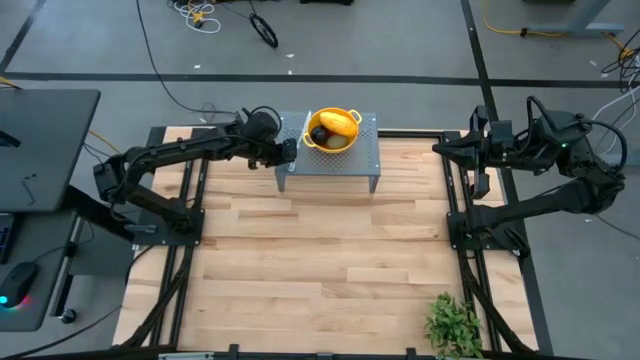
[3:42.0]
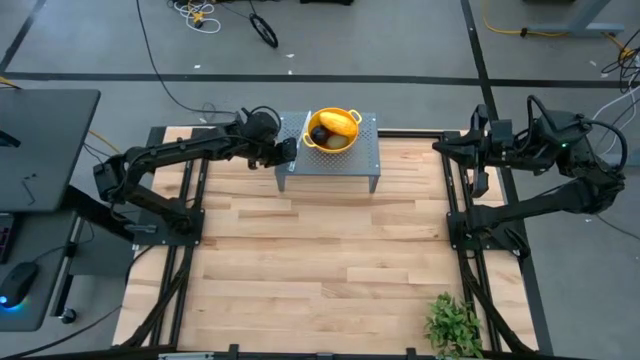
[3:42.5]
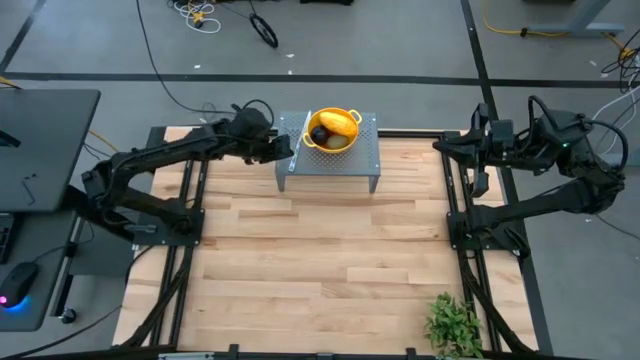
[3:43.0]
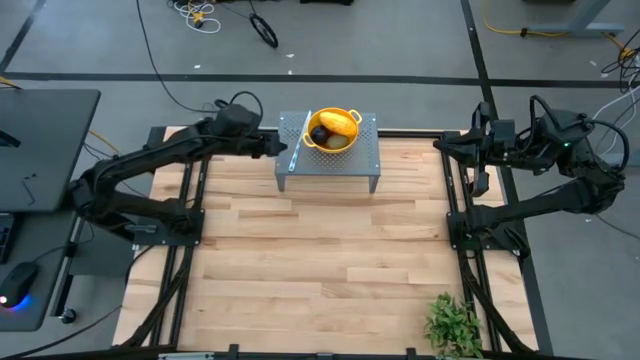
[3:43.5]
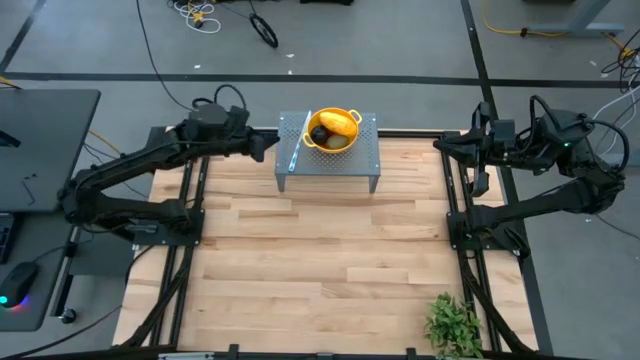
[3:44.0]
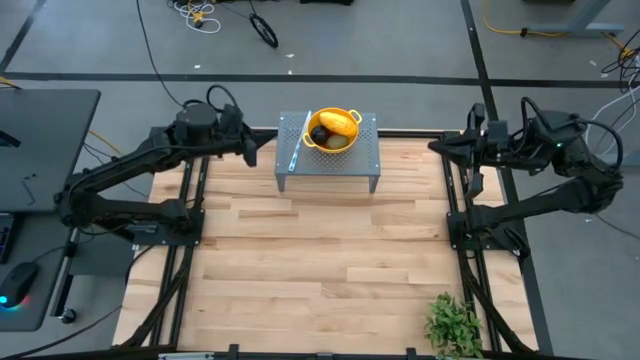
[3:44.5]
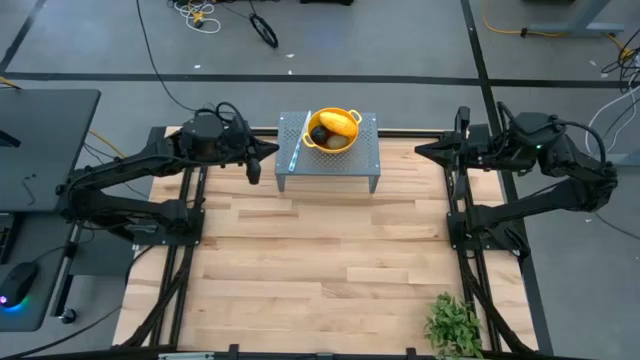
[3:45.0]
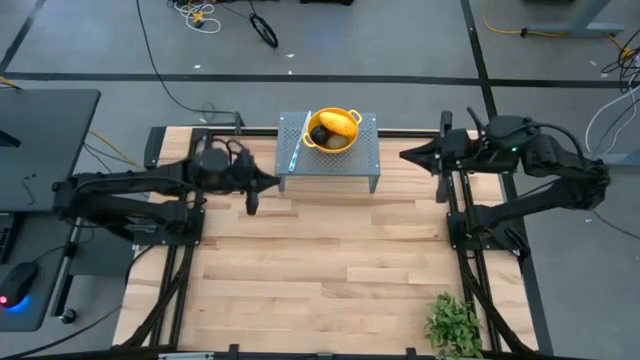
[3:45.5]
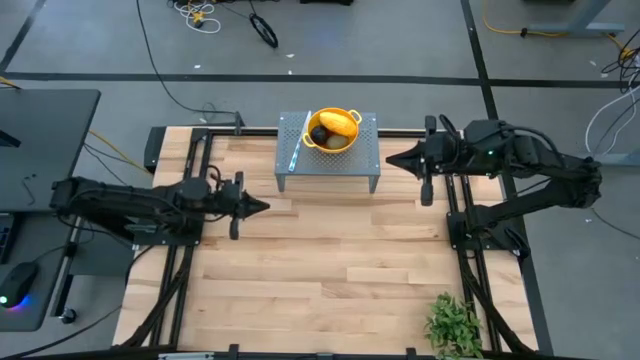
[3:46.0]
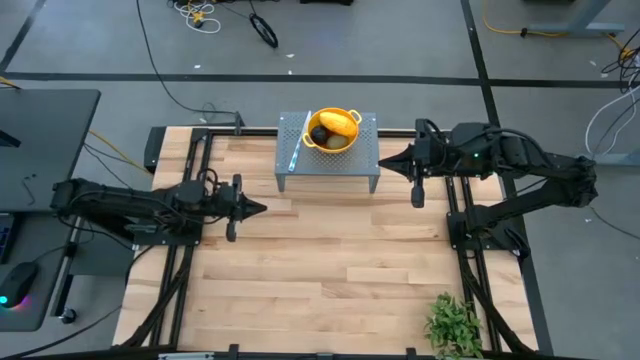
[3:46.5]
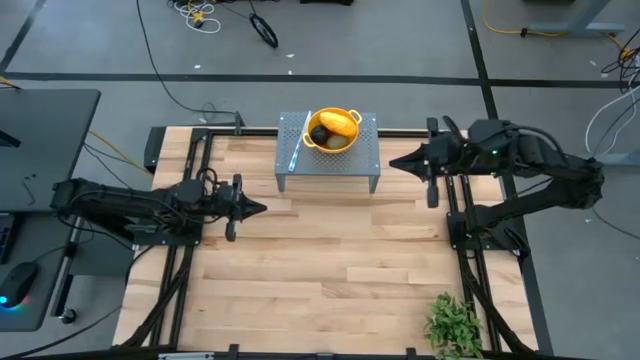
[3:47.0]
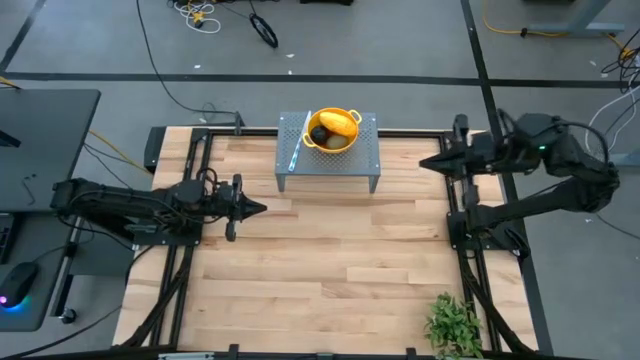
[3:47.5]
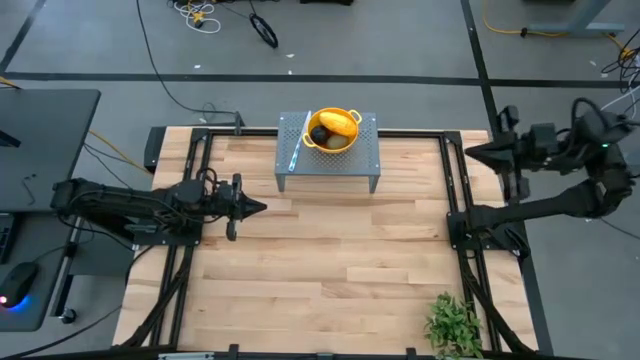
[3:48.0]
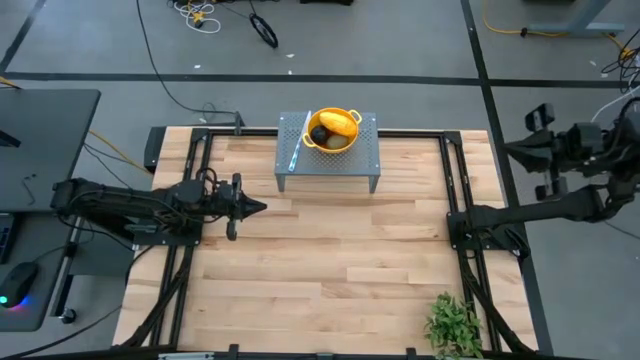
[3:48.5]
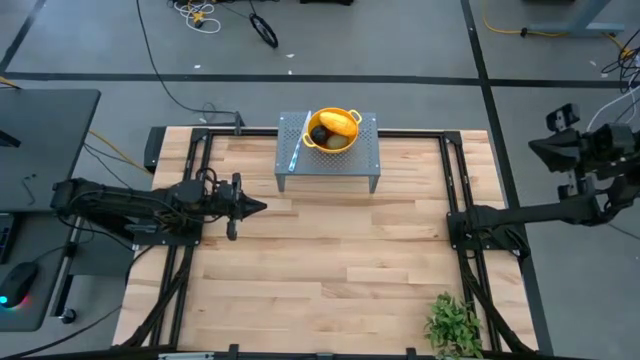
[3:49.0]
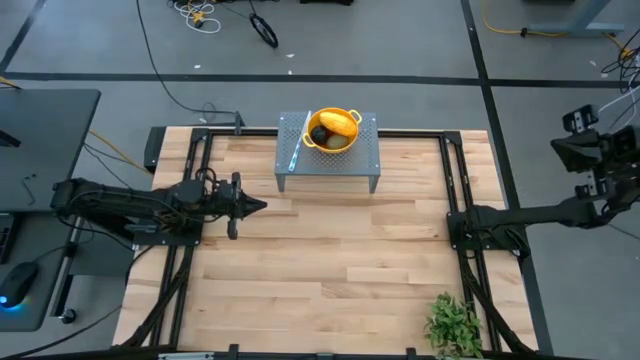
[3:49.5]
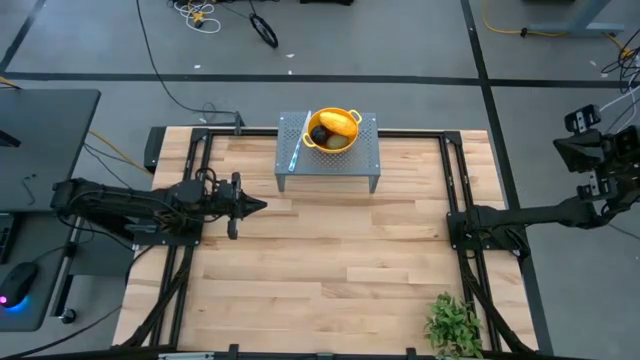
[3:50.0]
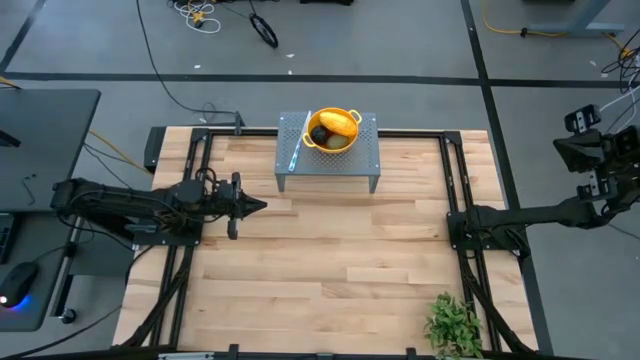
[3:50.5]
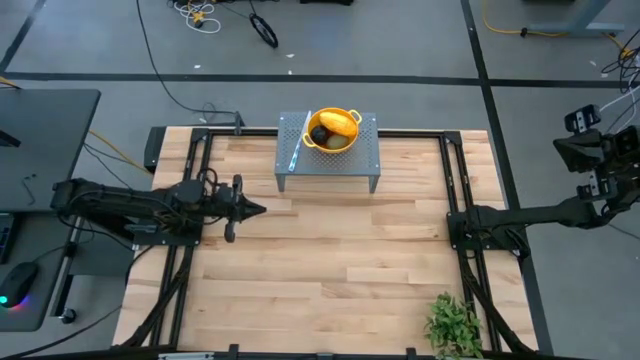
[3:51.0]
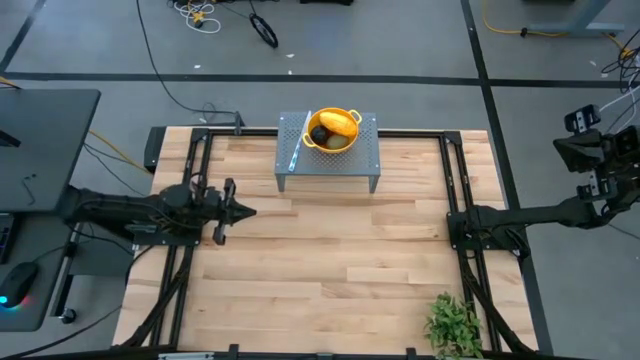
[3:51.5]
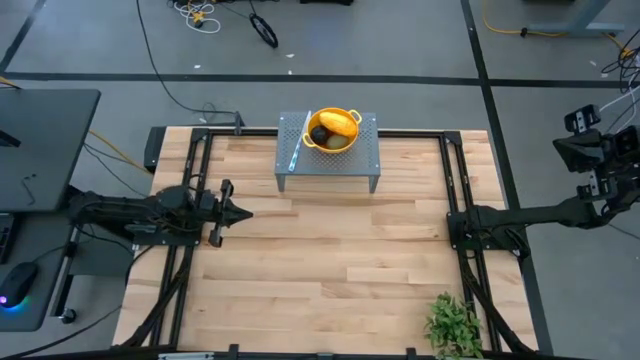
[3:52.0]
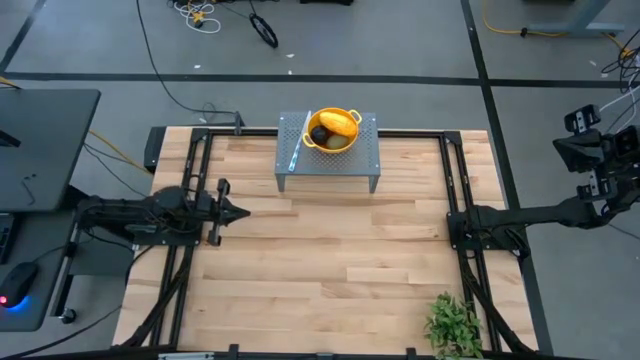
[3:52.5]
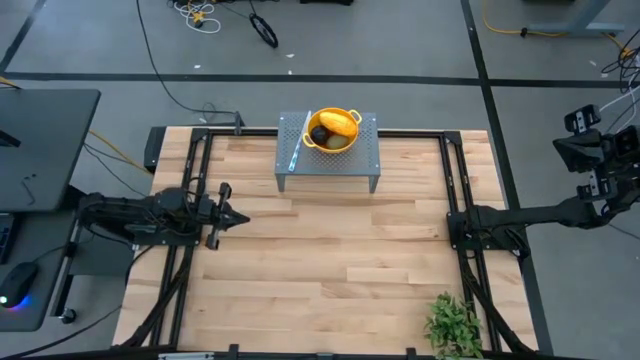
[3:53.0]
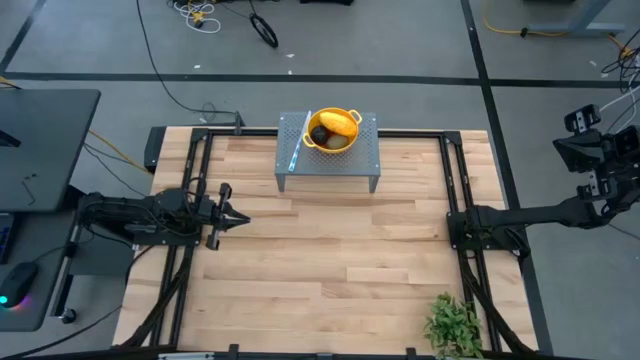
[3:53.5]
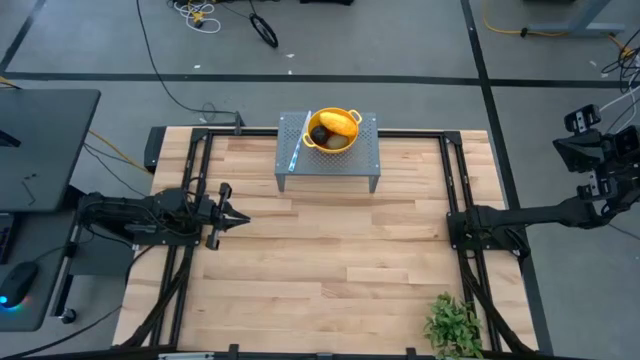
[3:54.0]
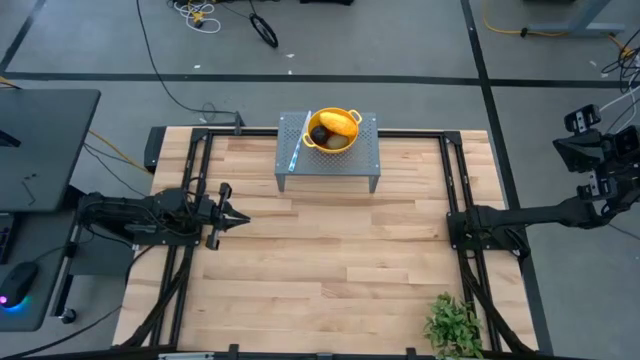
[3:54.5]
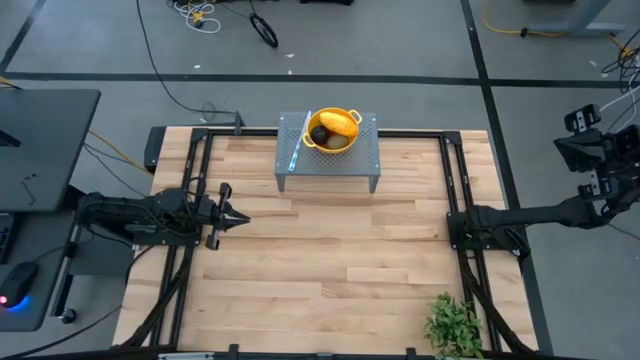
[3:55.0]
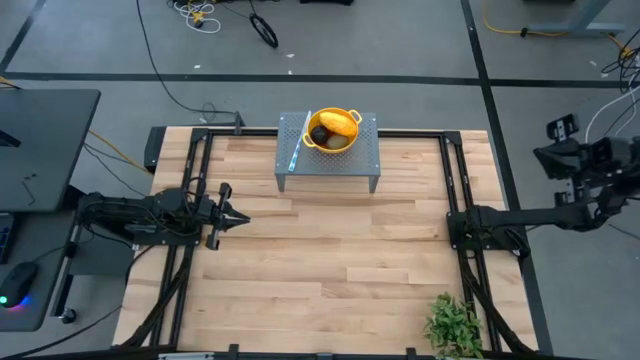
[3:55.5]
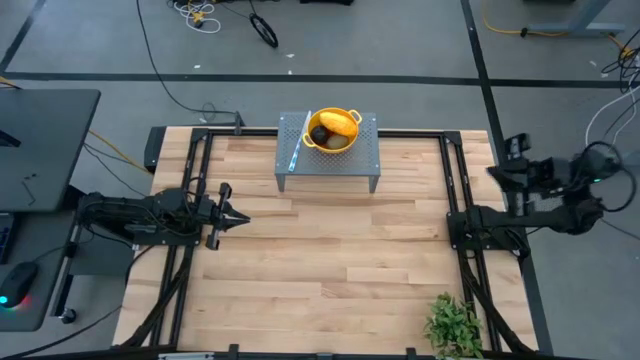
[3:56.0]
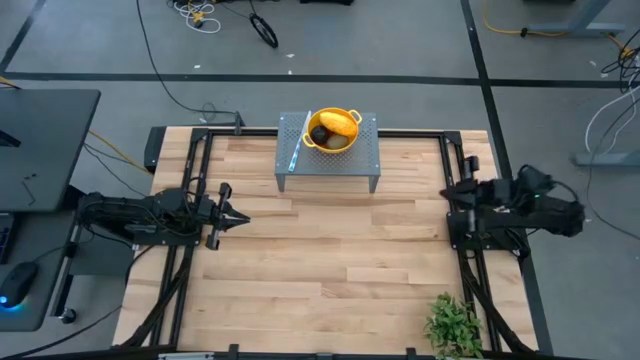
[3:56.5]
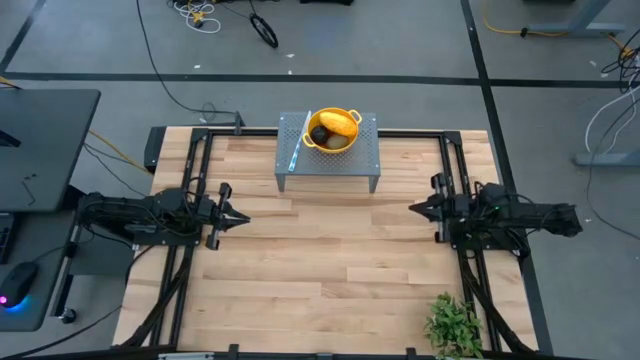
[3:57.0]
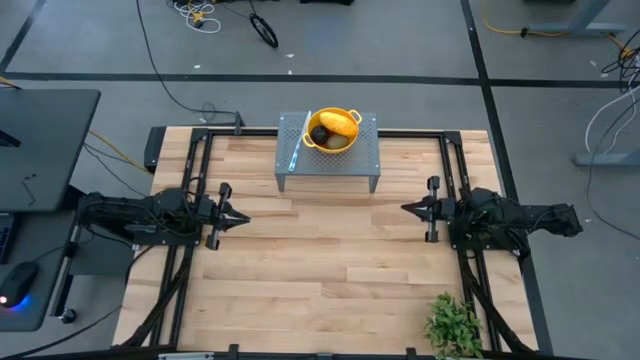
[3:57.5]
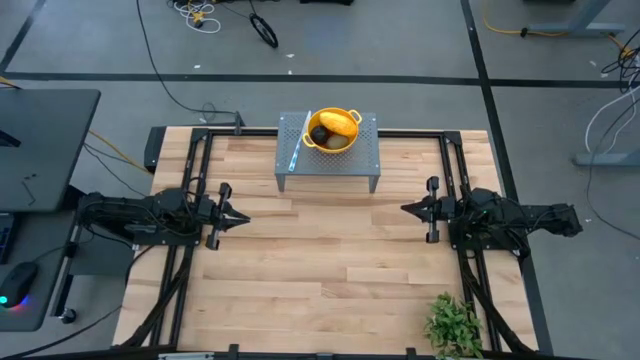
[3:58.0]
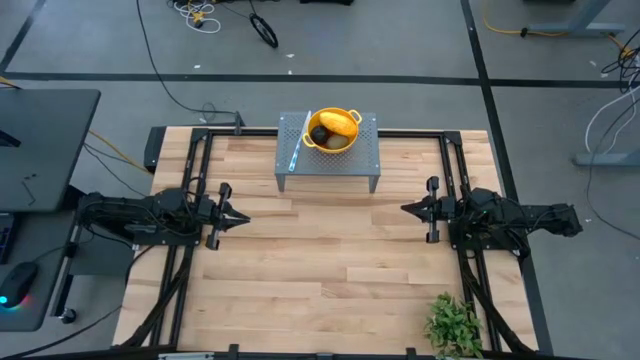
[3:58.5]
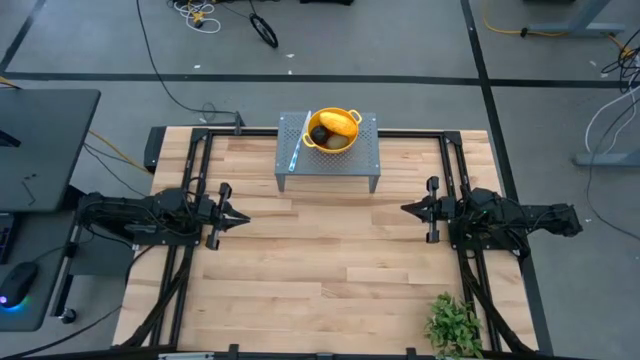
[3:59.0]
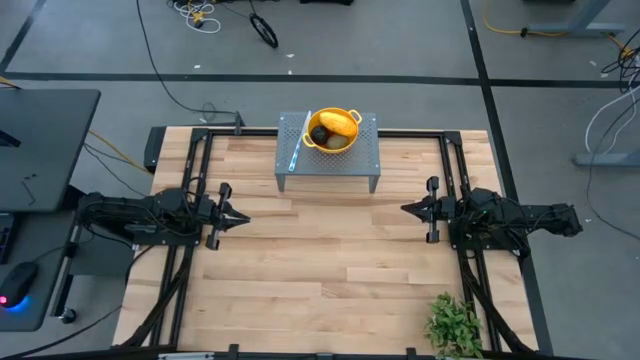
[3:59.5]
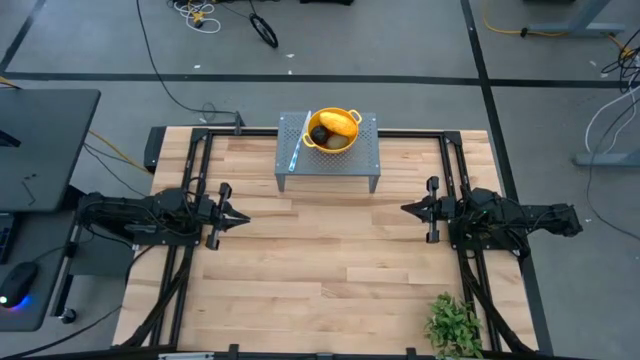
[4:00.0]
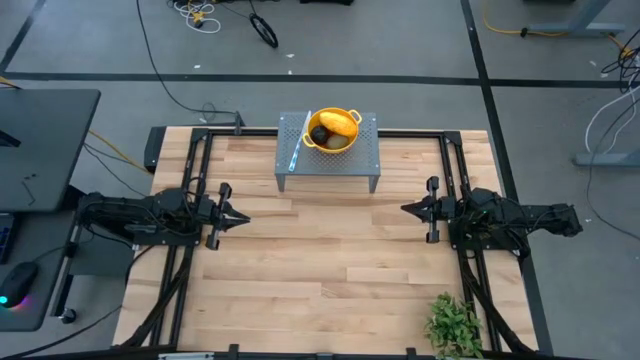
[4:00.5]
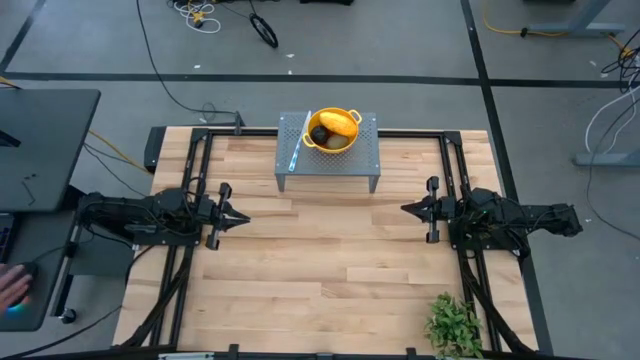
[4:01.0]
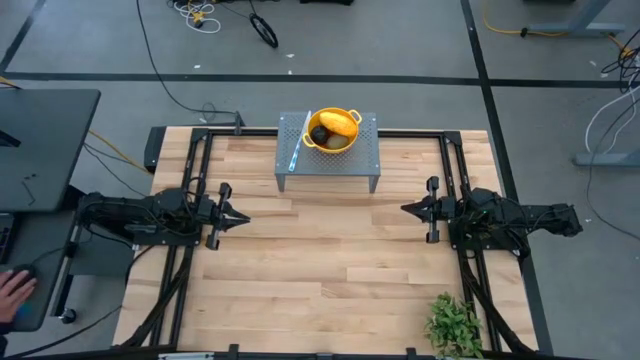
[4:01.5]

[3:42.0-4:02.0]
Task: Pick & Place Fruit
Return to Home Position

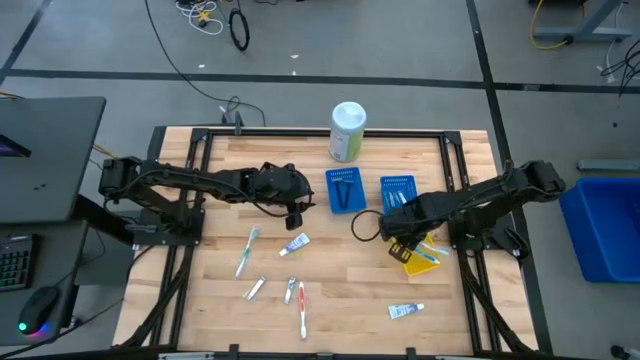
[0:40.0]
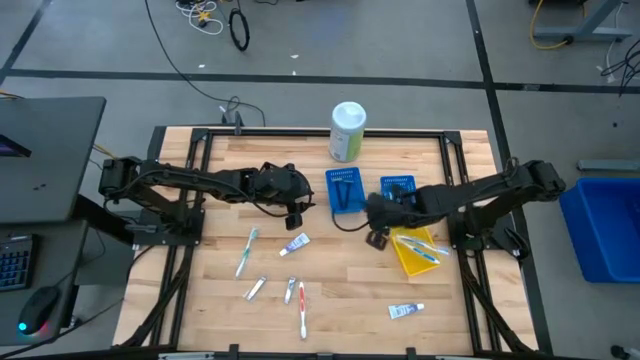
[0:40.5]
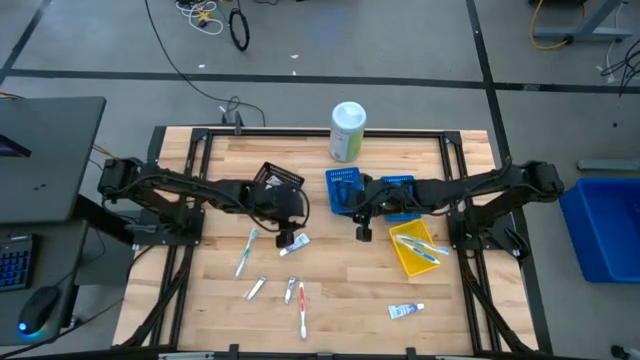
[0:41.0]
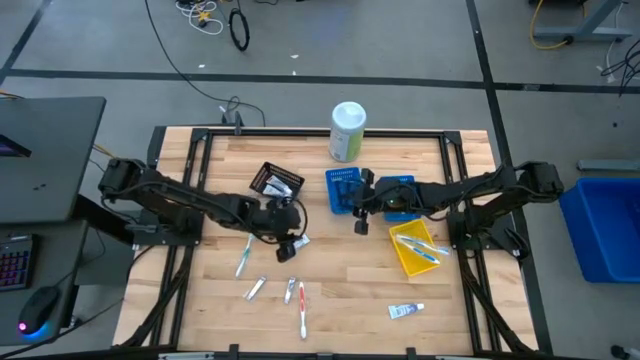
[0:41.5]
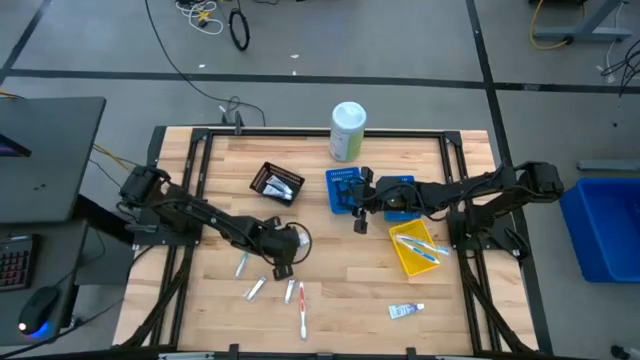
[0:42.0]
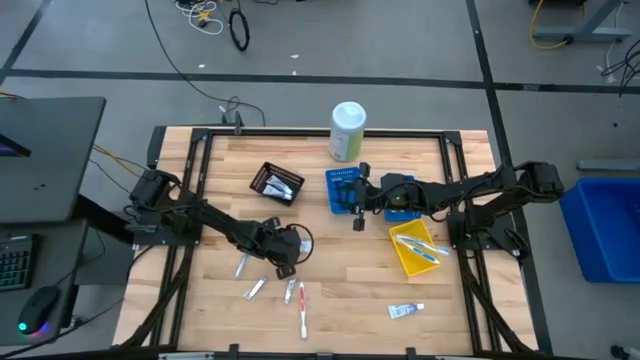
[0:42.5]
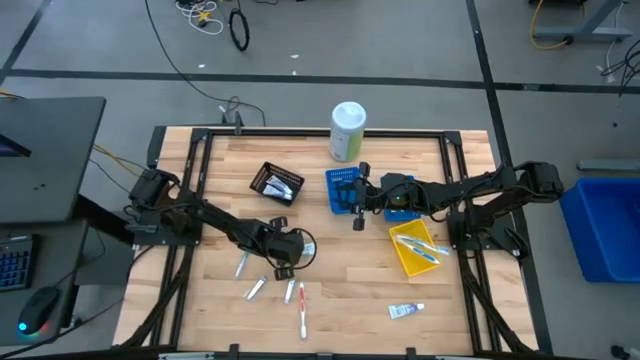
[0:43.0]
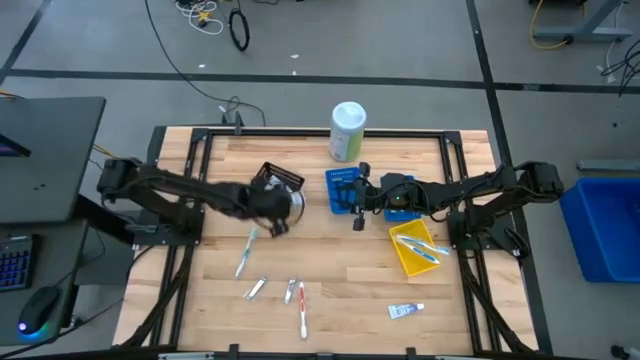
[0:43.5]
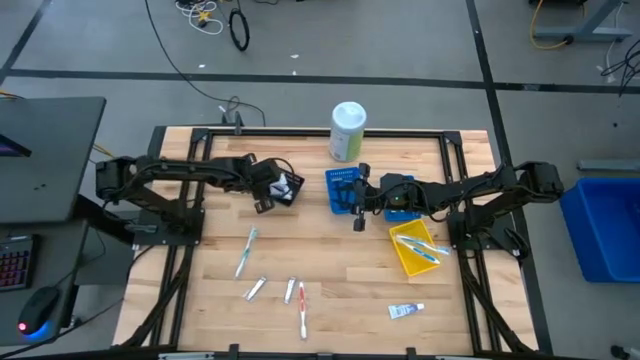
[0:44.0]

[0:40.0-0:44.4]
Task: Pick & Place Travel size toiletries
Put the toothpaste into the black basket
